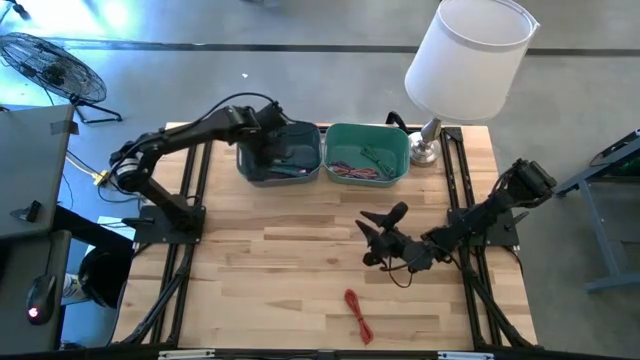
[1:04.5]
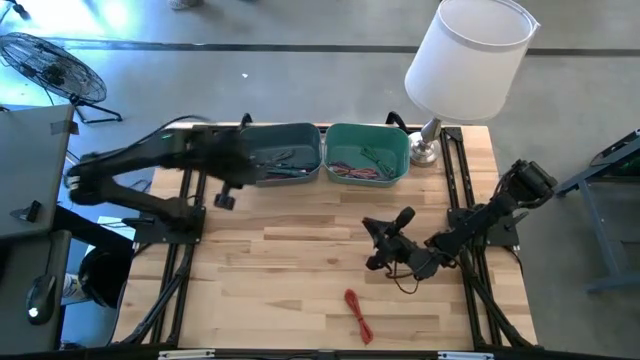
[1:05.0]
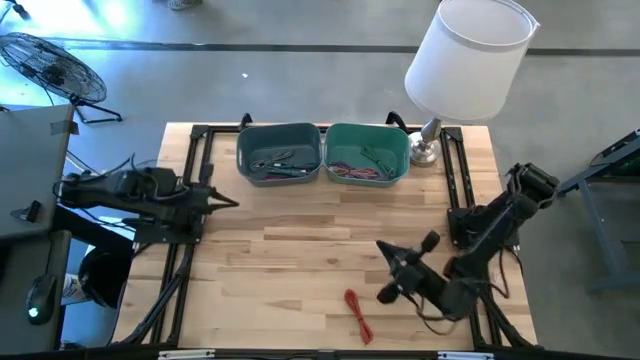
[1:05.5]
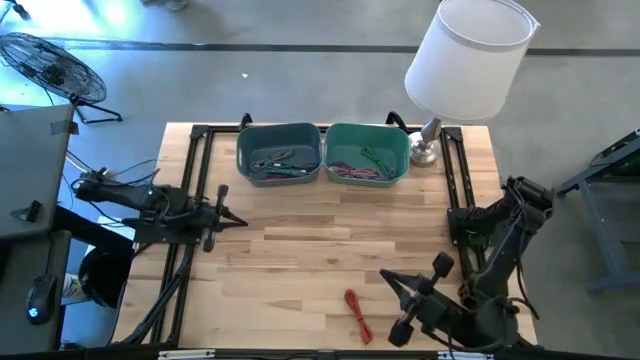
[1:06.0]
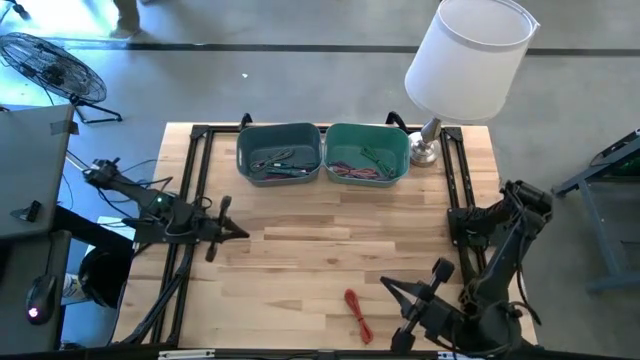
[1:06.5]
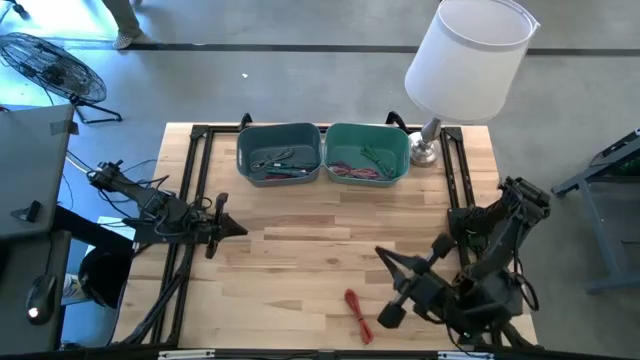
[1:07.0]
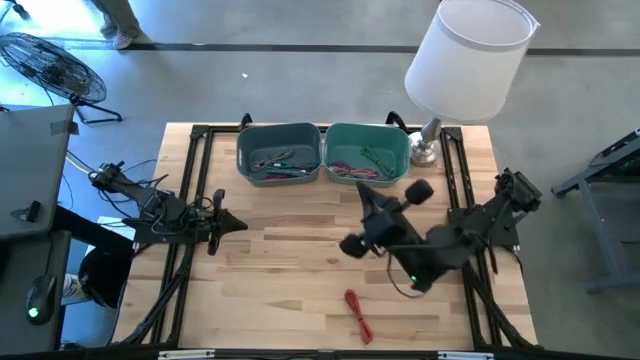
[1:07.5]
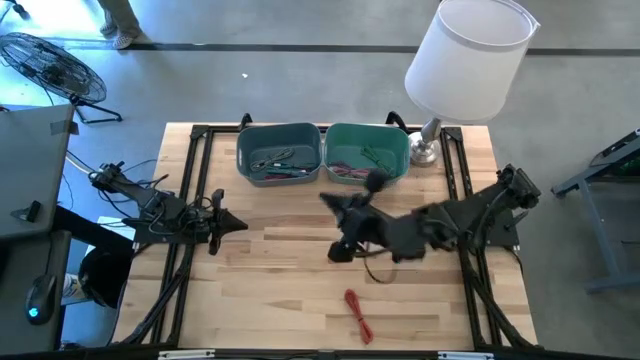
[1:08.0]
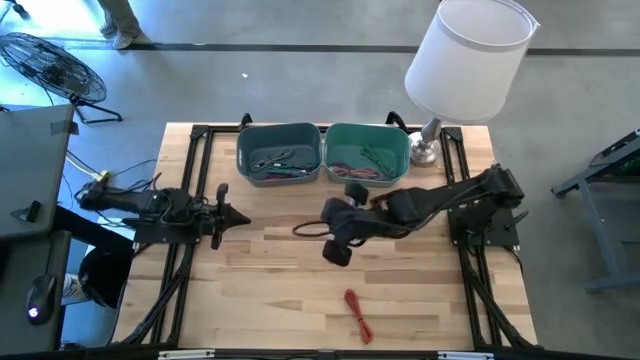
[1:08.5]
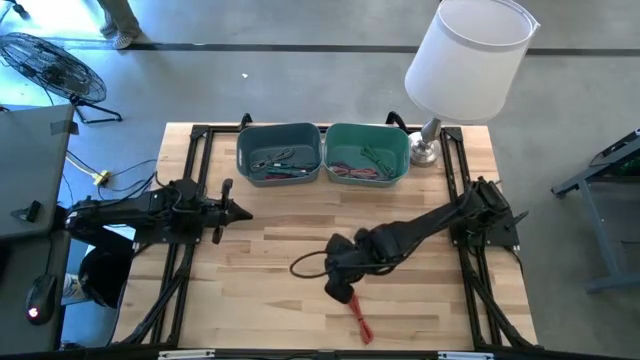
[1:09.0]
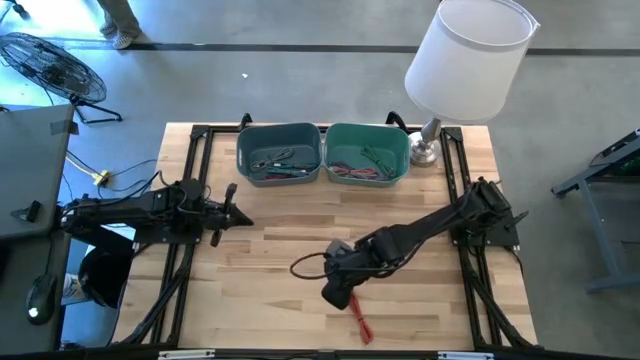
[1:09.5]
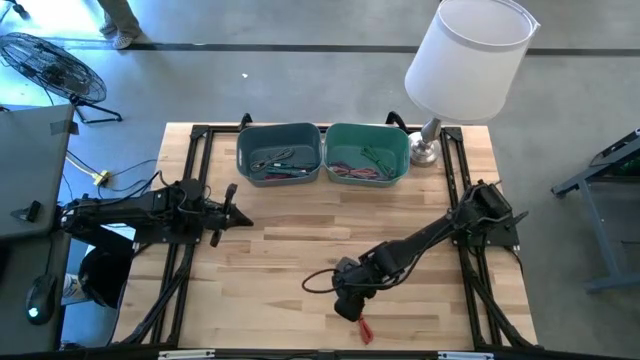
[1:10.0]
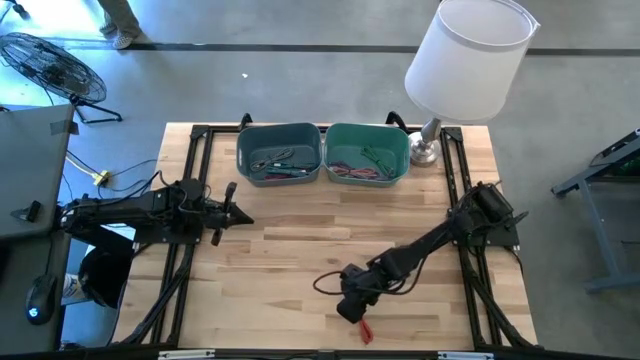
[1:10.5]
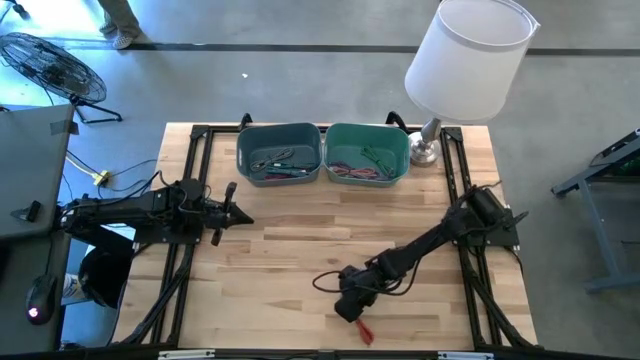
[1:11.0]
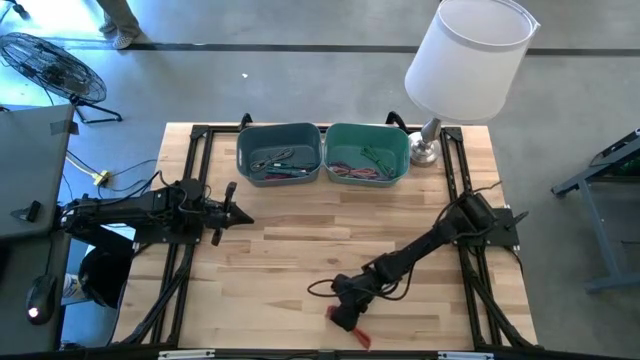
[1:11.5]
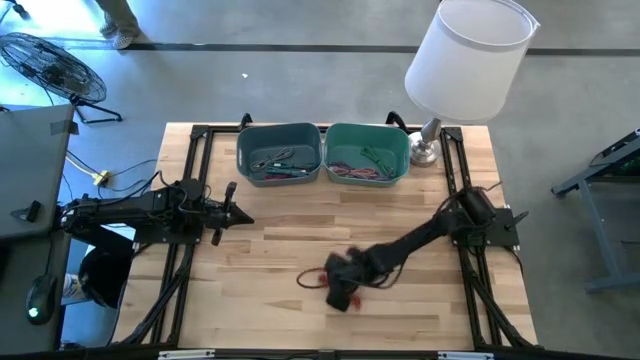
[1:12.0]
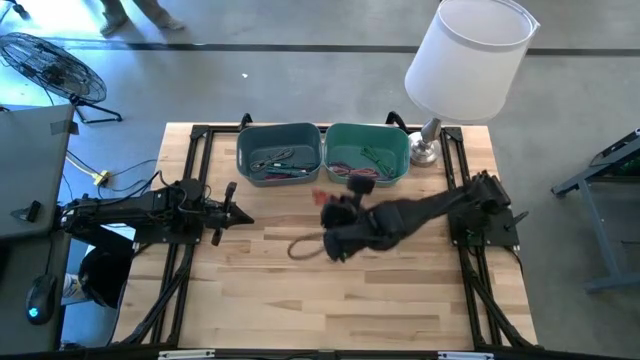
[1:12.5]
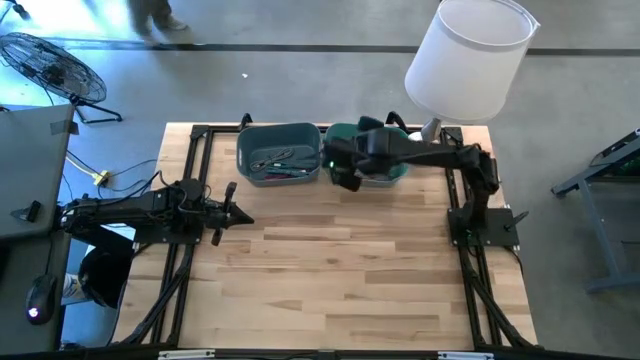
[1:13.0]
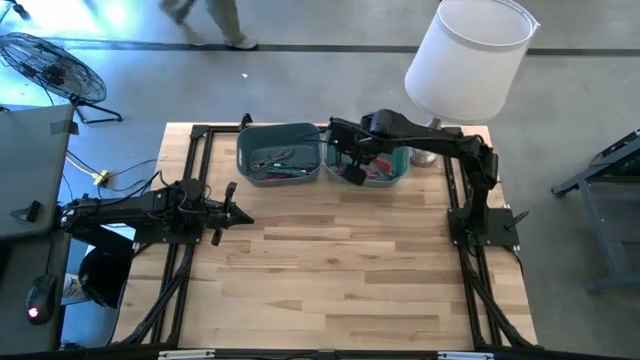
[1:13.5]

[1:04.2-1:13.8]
Task: Pick & Place USB Port
Put the orange USB cable into the green bin

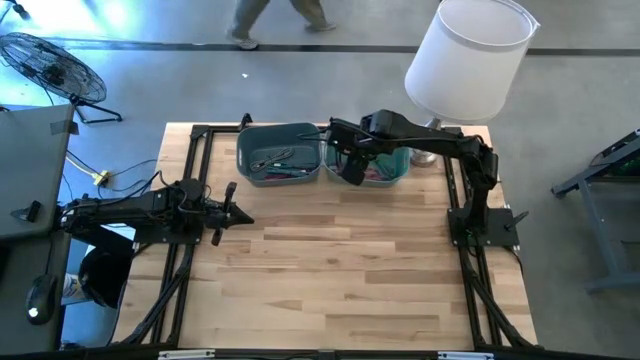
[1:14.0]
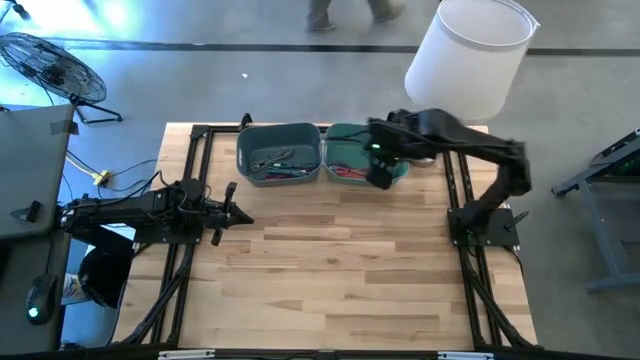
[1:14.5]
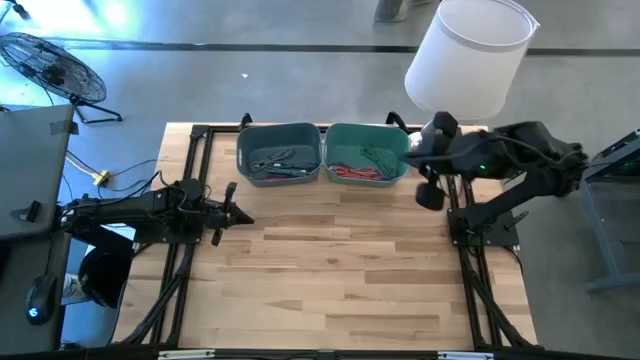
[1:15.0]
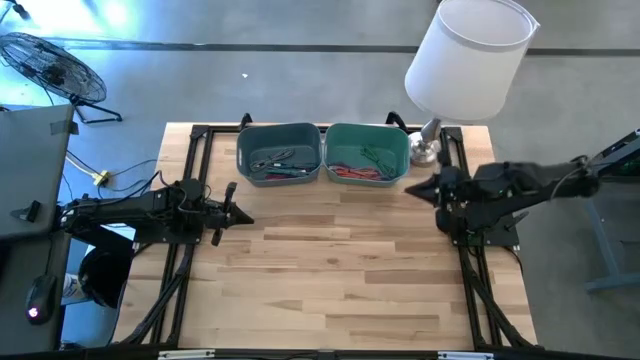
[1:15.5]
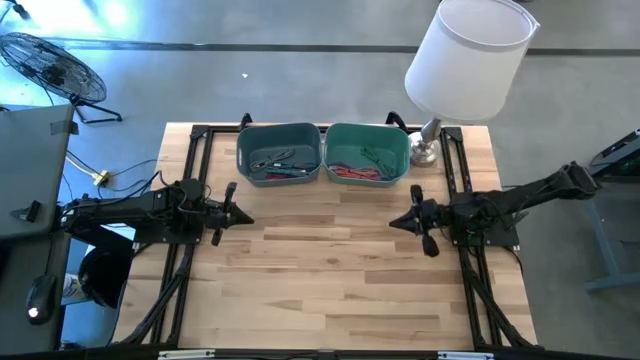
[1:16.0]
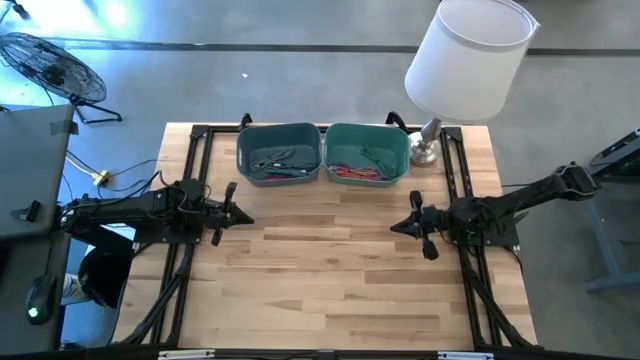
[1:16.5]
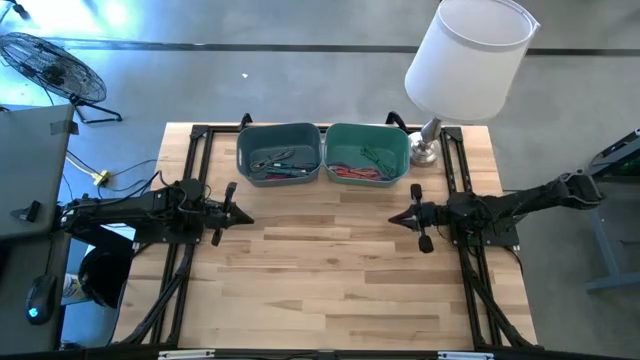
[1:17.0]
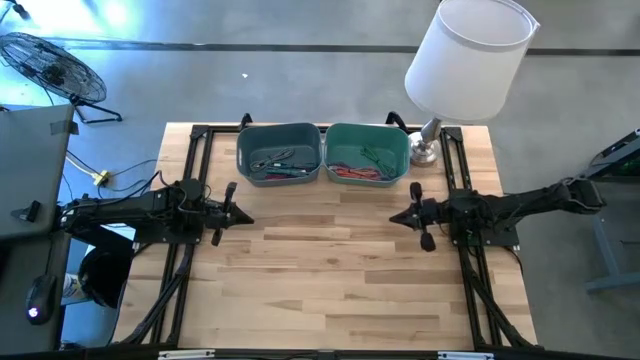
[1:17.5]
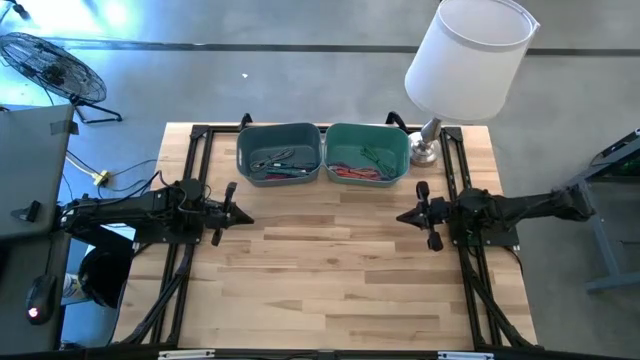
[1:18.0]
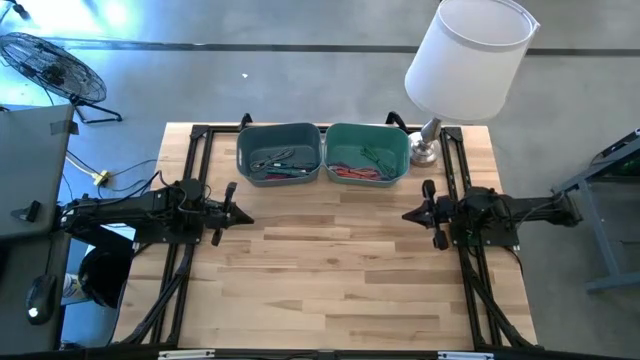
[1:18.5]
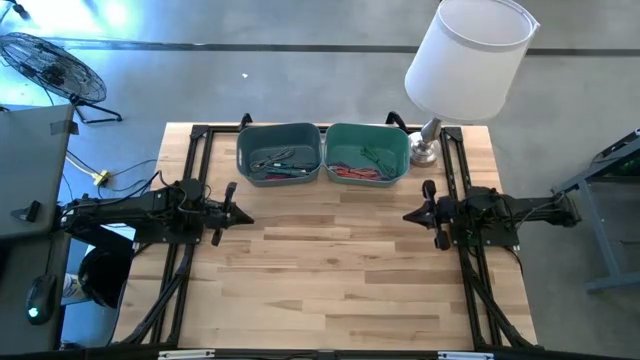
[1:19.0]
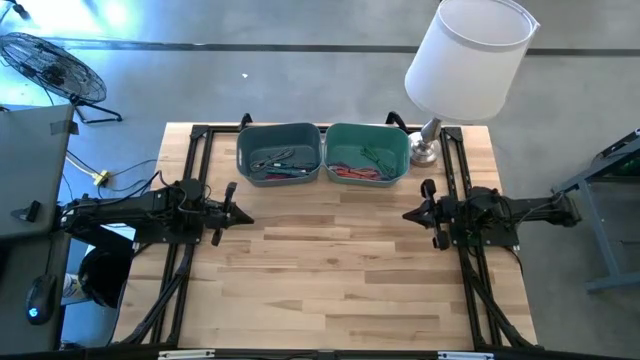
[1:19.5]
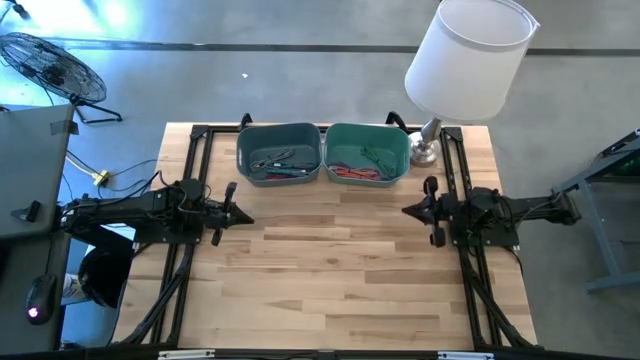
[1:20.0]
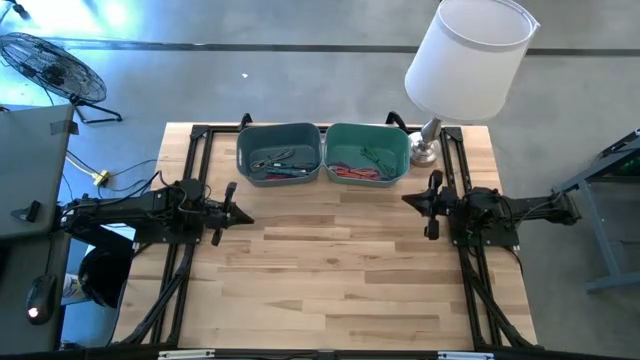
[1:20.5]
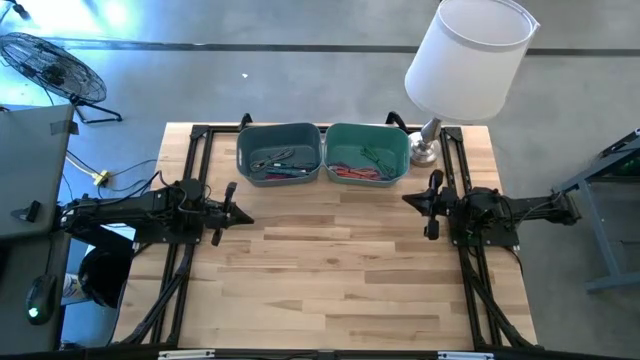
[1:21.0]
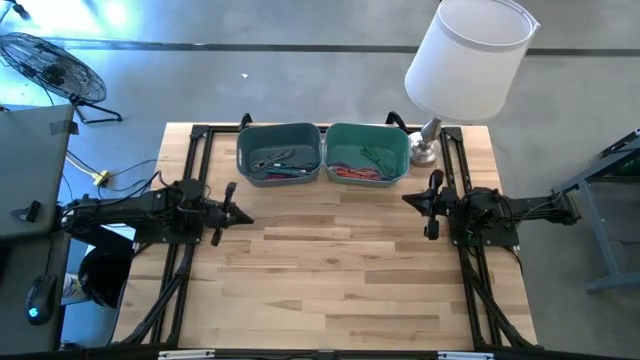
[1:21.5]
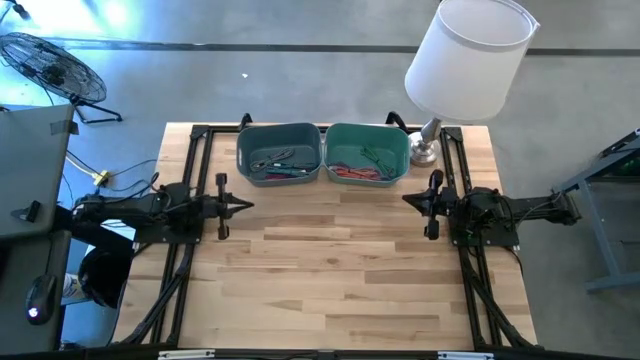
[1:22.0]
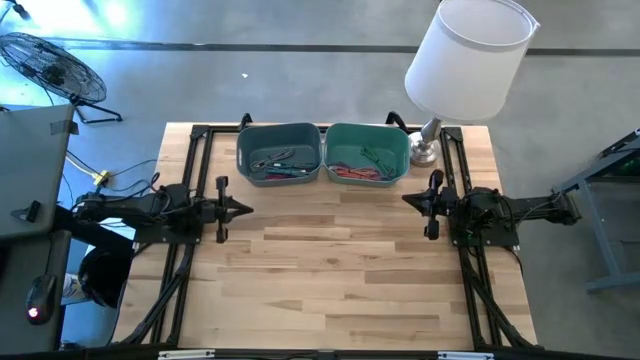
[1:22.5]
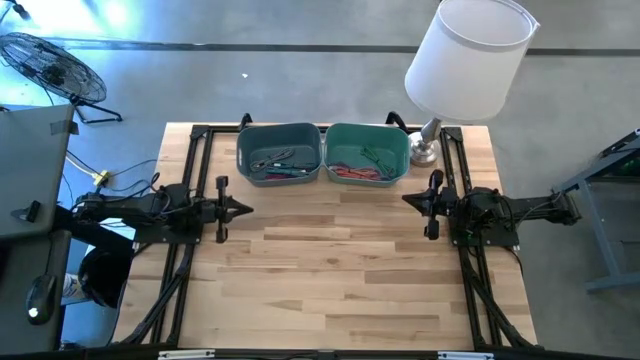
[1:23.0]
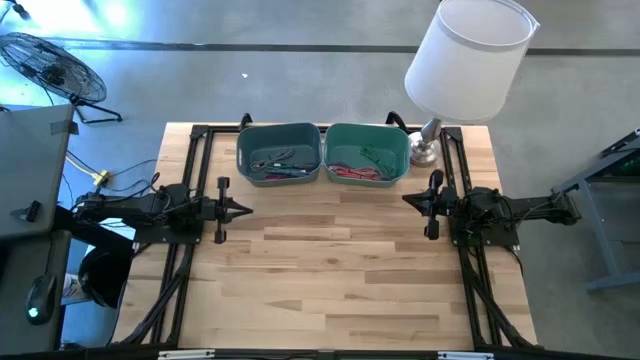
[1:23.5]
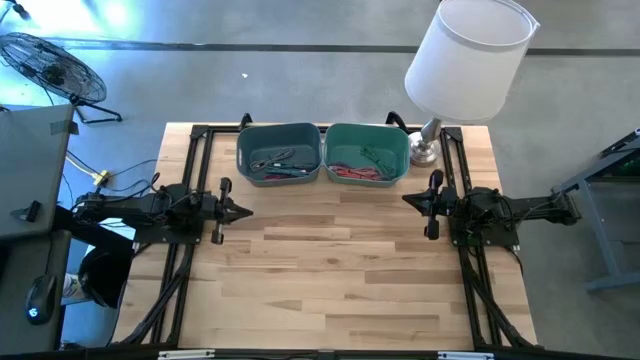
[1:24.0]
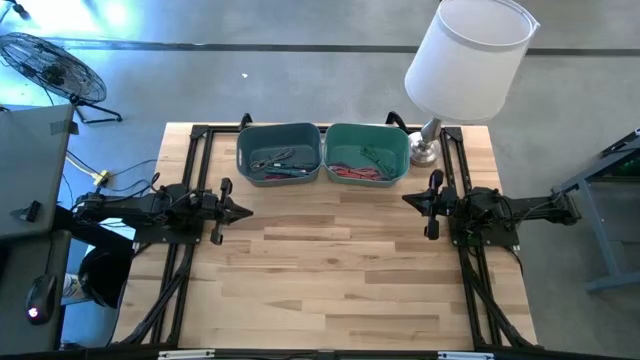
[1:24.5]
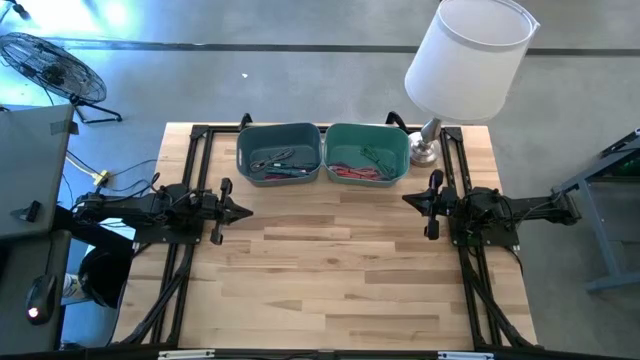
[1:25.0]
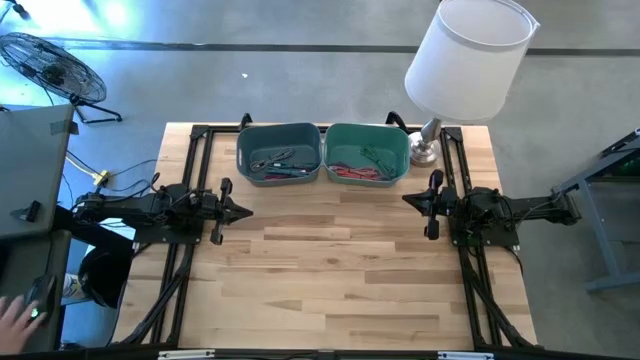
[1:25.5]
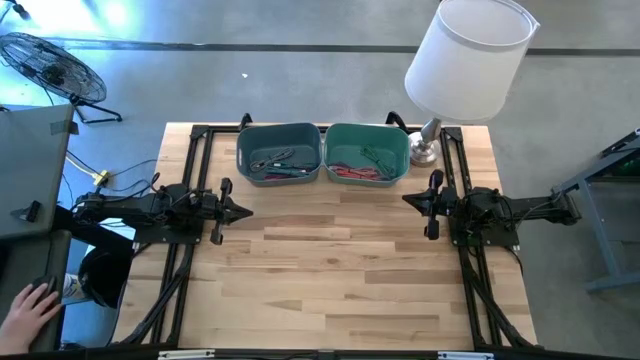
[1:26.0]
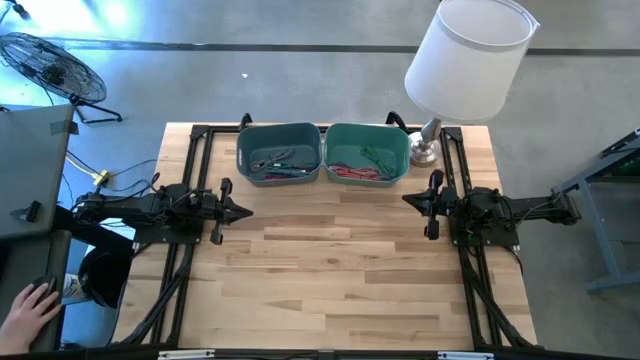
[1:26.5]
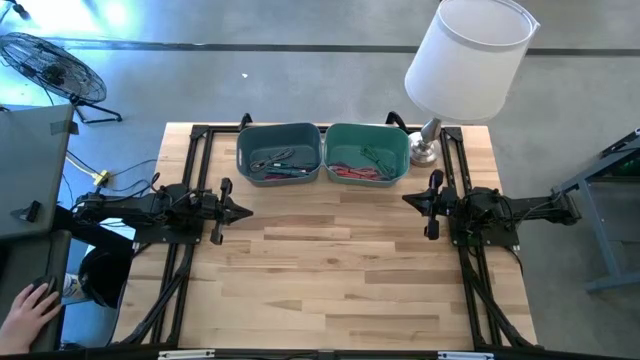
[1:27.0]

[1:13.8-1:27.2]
Return to Home Position
